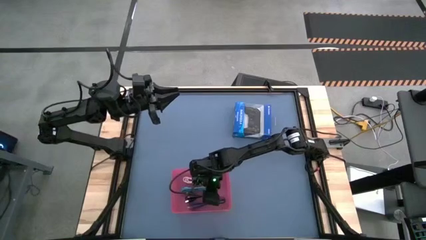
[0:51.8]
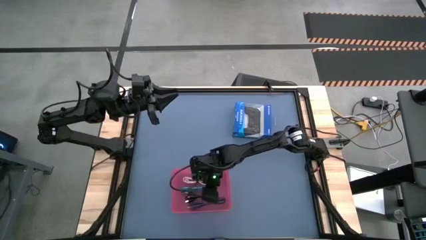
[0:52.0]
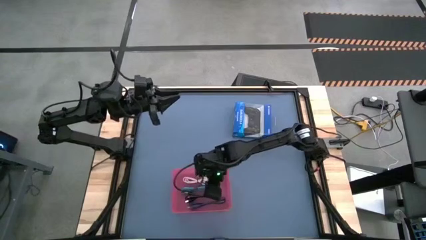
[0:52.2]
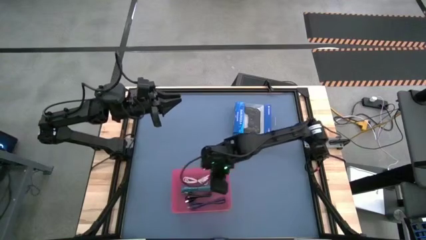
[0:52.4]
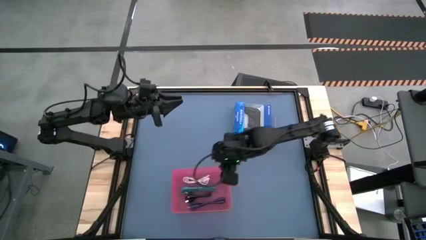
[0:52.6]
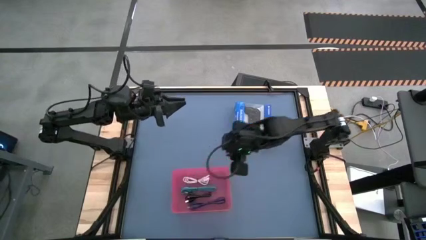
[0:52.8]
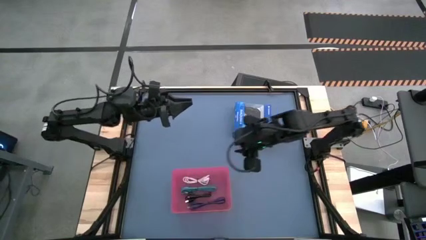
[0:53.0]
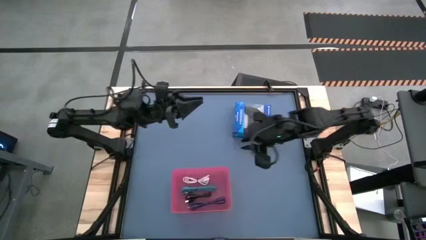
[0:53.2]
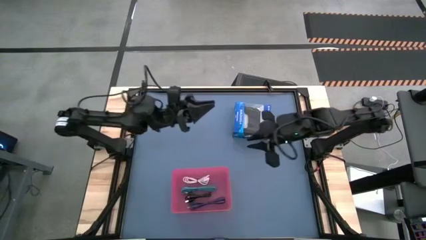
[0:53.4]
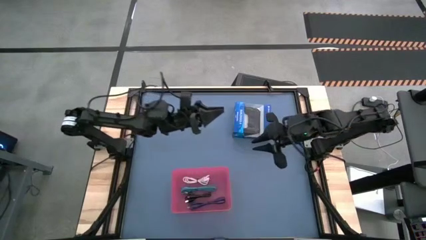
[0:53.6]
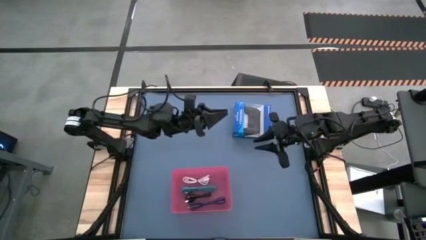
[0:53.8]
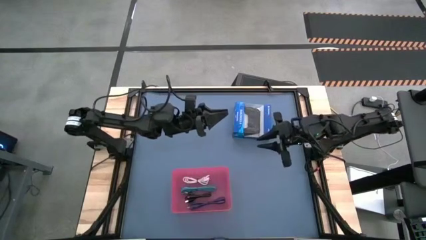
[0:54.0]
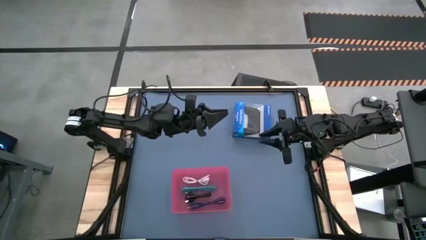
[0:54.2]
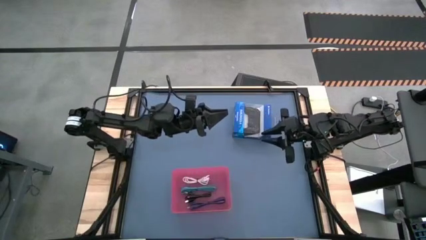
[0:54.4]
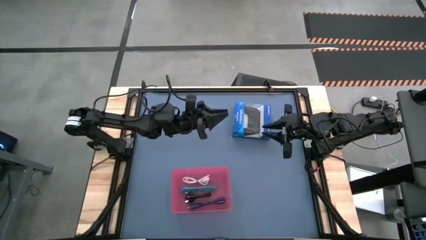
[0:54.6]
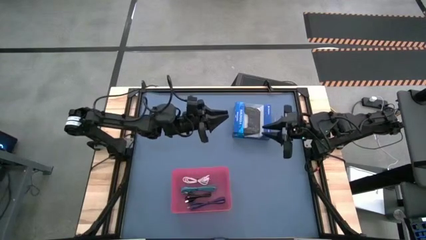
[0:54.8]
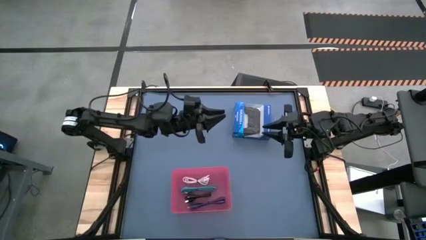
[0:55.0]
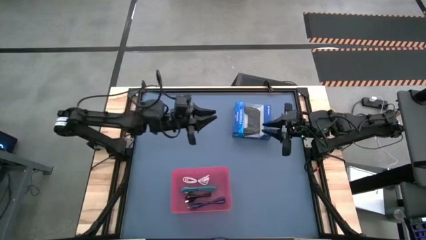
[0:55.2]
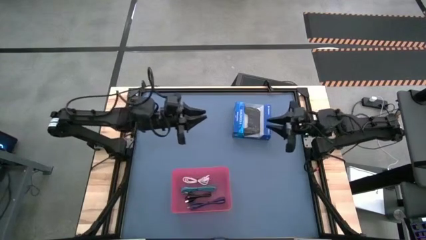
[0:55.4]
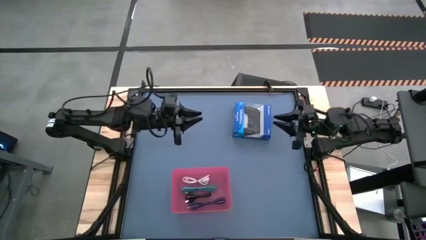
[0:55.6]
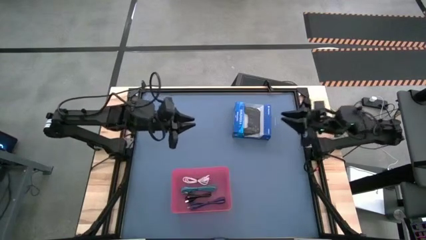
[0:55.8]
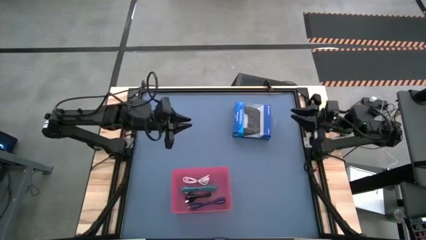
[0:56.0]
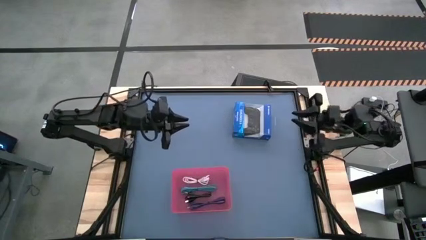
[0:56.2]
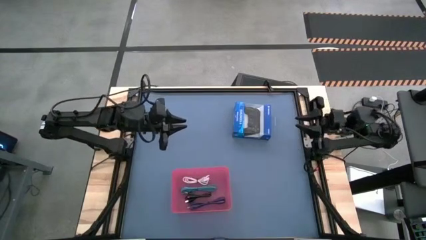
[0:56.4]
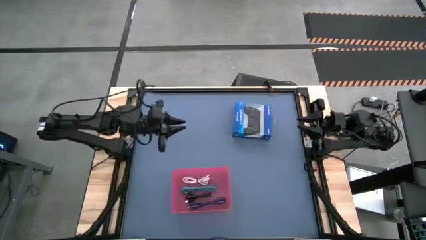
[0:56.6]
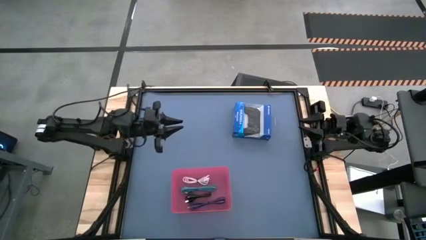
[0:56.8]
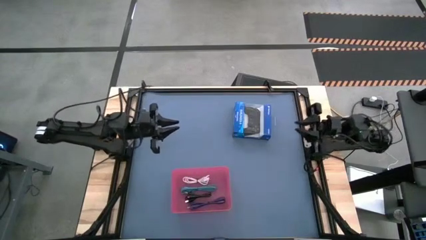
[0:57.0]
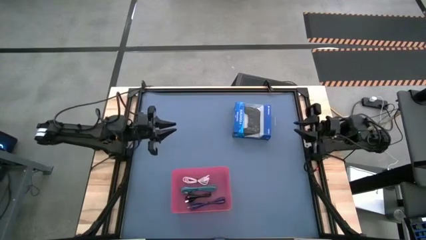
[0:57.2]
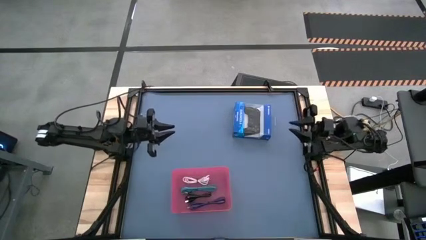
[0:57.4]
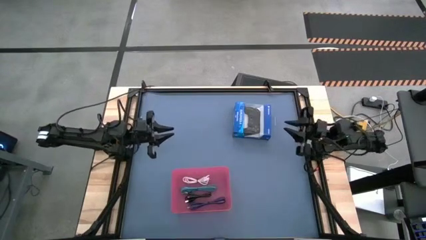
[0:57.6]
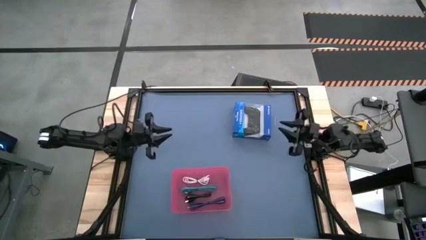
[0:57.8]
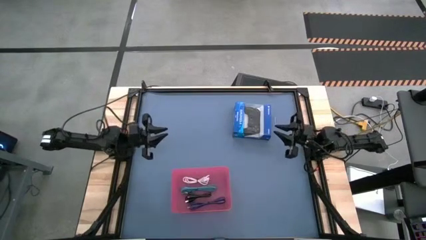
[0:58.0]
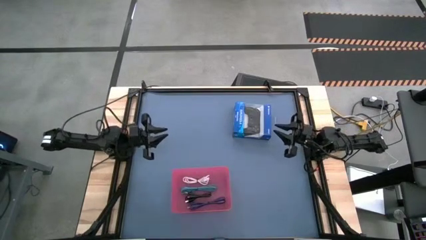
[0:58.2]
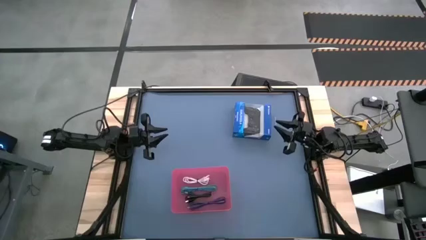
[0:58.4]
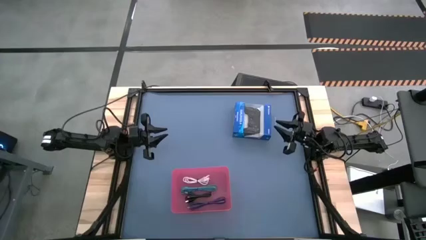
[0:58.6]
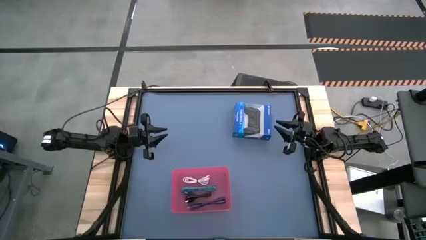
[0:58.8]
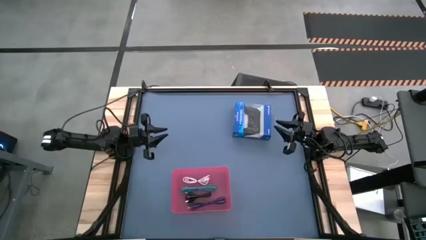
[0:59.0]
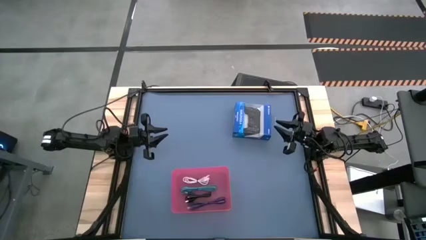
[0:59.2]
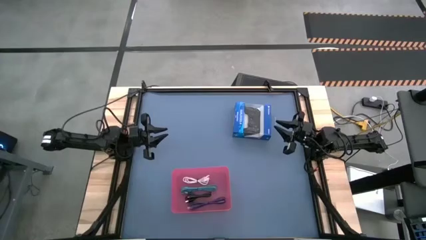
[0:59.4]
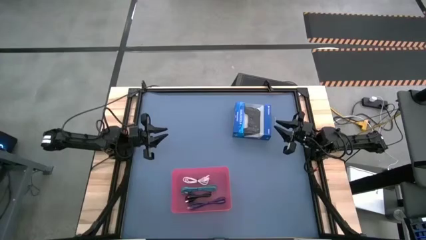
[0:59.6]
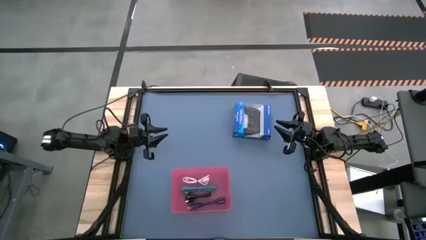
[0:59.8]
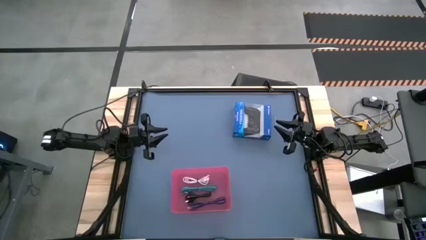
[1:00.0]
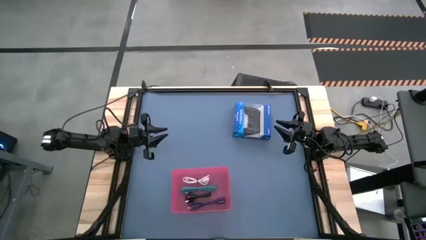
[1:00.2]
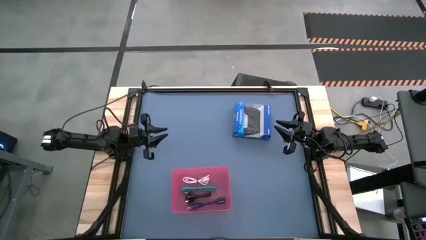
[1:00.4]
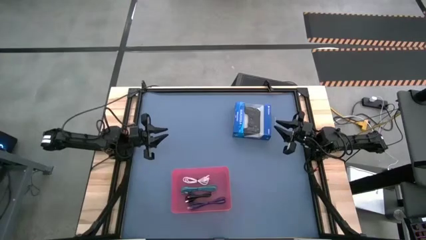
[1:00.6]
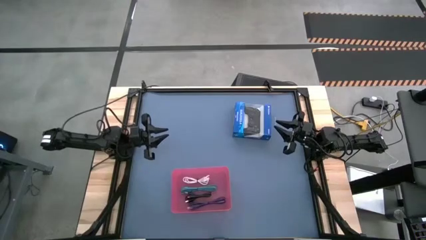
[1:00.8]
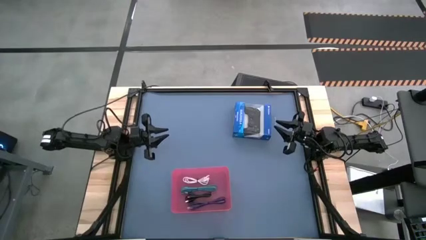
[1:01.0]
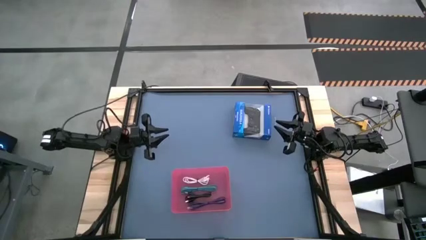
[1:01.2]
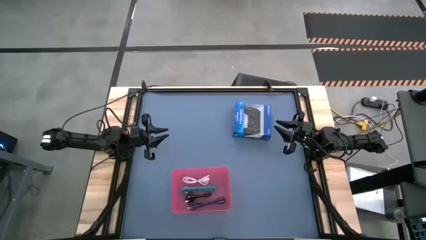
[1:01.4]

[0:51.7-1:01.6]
Task: Pick and place USB-C Cables
Return to Home Position

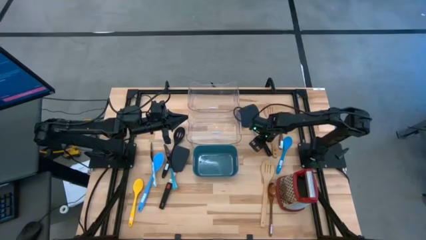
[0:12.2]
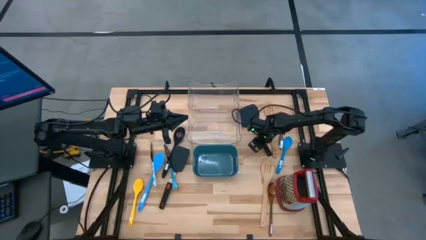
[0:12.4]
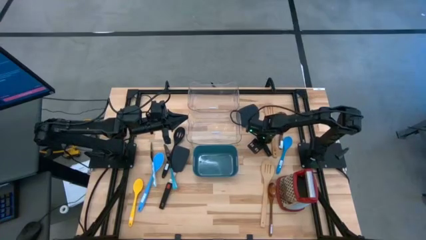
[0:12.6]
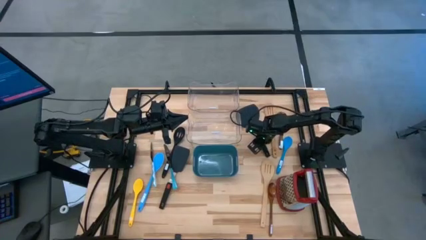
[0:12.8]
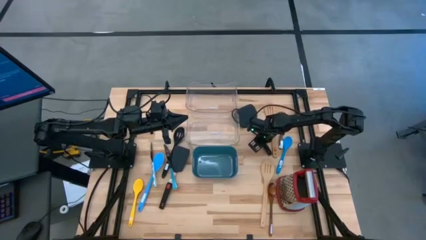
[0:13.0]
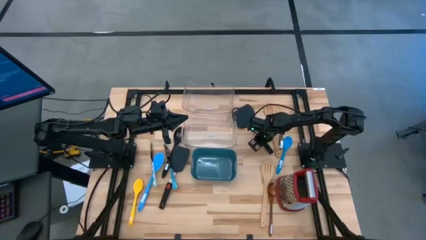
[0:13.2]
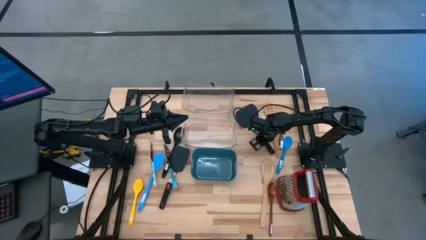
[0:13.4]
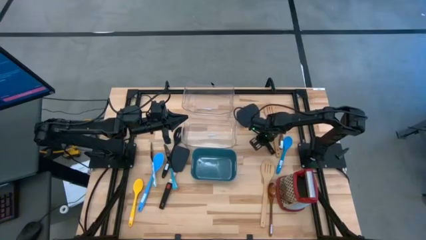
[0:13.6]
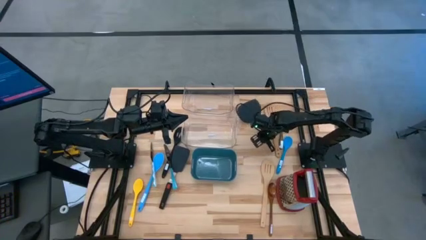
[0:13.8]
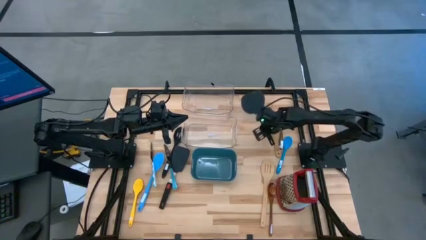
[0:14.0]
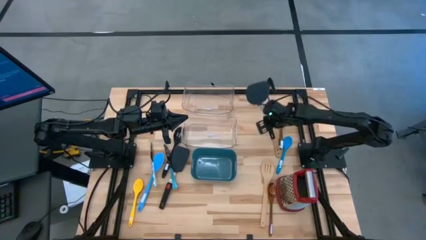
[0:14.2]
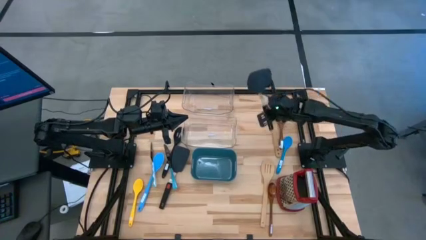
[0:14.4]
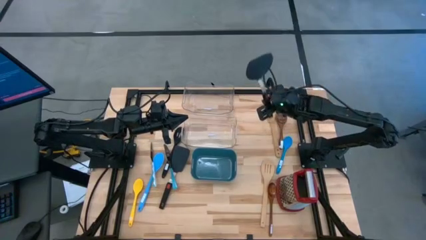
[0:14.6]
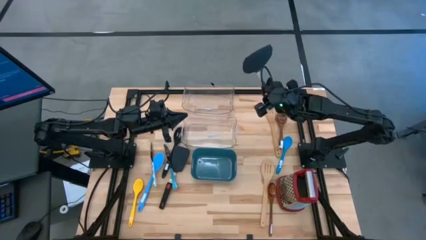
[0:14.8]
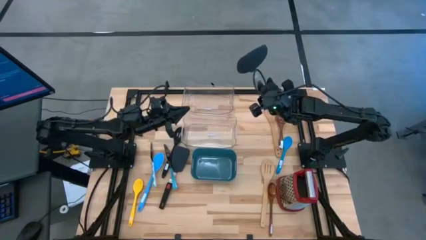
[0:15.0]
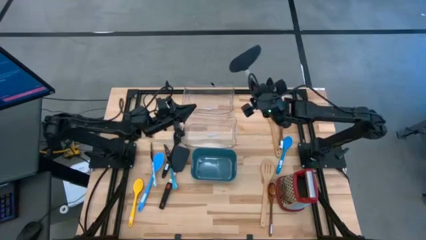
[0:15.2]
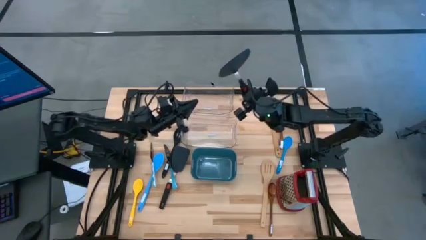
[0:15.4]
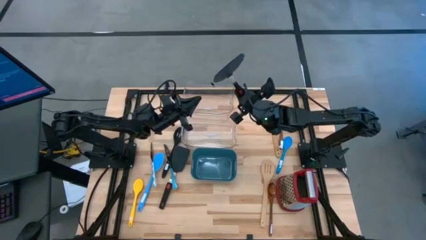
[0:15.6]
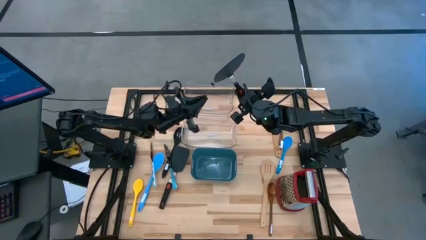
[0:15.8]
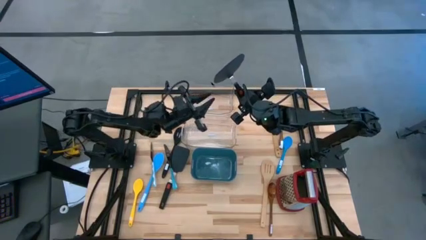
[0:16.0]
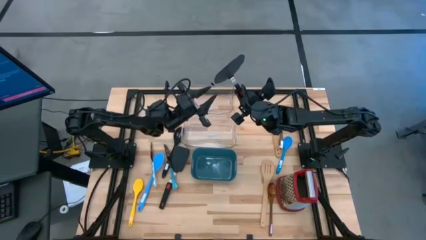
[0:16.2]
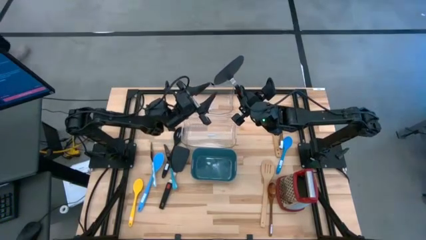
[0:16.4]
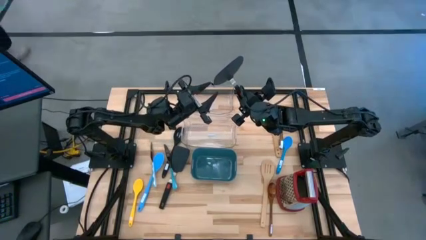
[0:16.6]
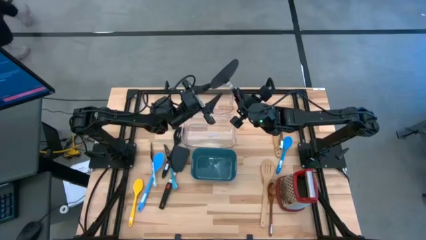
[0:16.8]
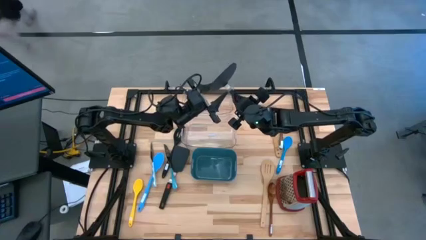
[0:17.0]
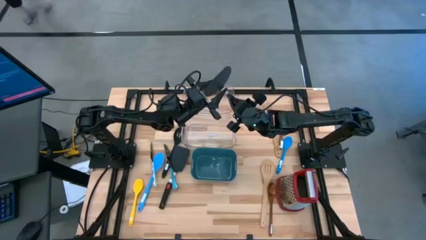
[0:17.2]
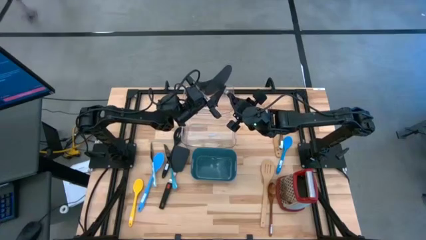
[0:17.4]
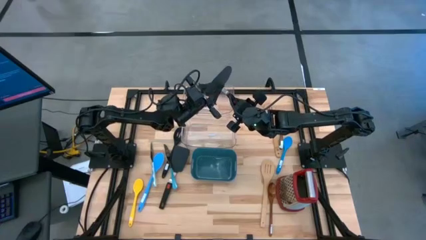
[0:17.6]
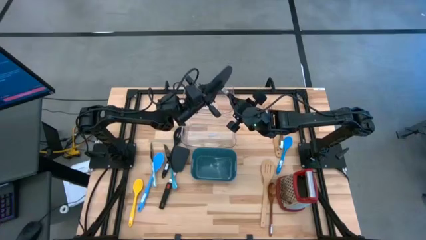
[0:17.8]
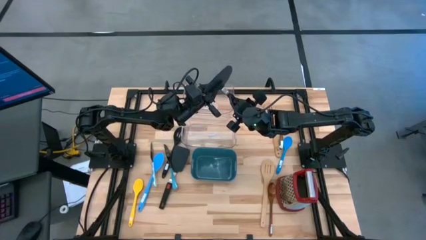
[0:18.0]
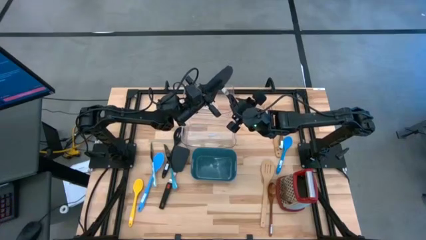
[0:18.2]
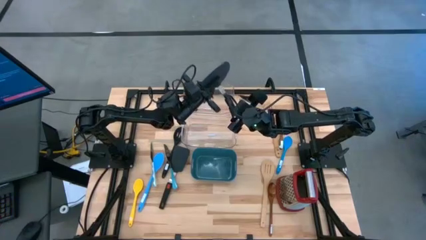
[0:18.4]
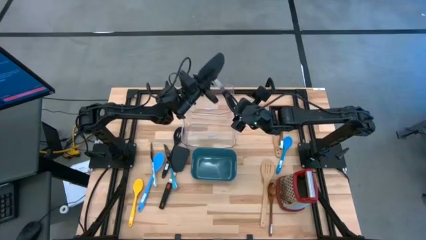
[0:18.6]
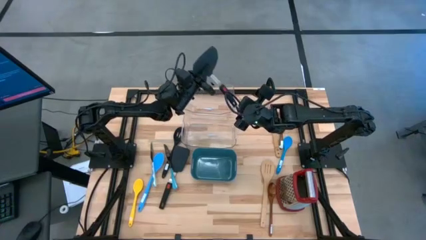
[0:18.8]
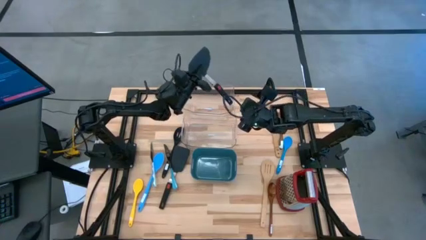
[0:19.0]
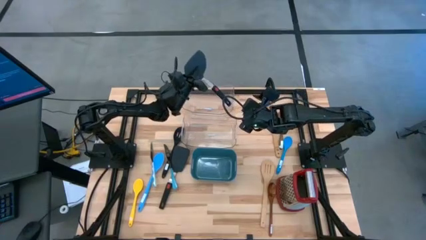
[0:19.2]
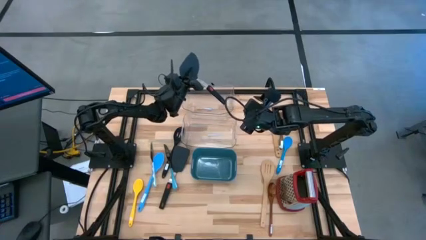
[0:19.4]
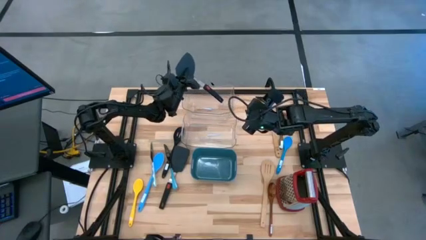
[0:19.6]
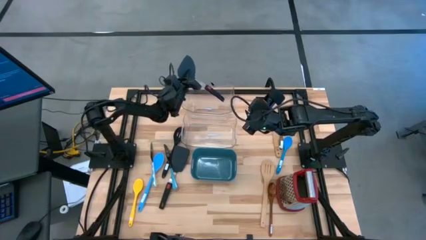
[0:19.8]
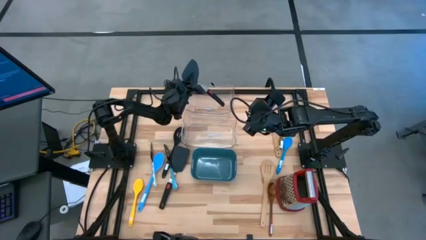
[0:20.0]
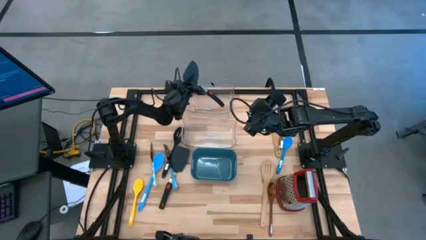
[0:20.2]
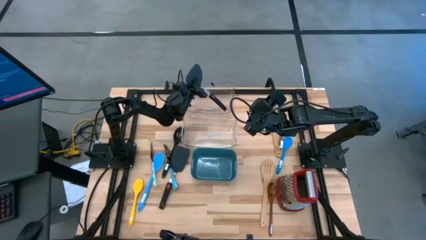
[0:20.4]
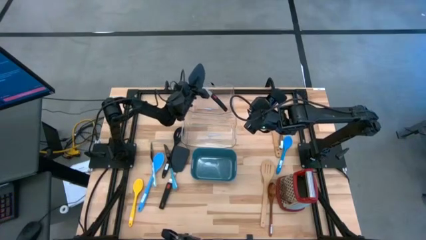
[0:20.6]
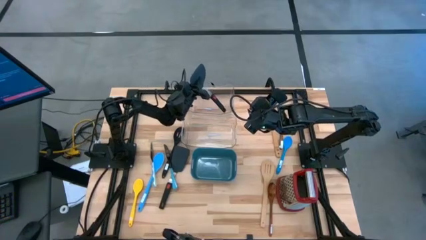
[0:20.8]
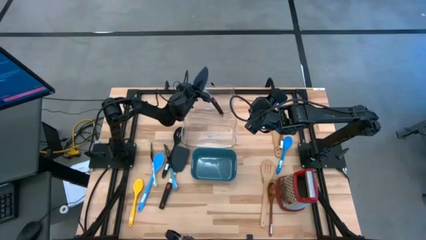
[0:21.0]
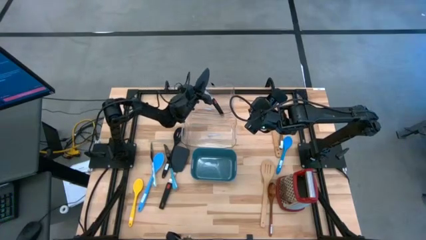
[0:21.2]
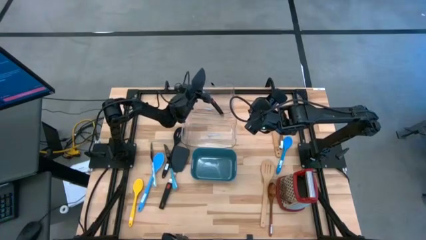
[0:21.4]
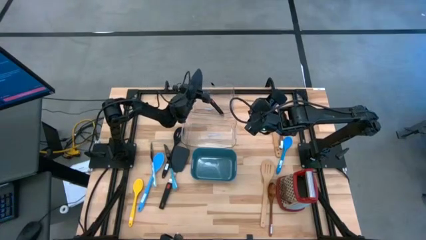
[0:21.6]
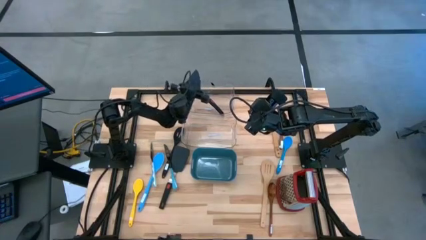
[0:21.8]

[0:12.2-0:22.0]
Task: Pick & Place Kitchen Items
Put the black spatula into the top transparent bin
